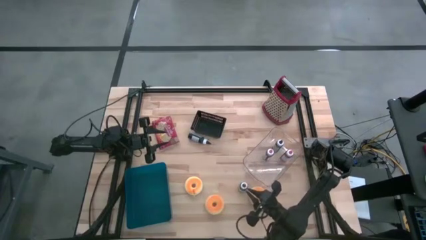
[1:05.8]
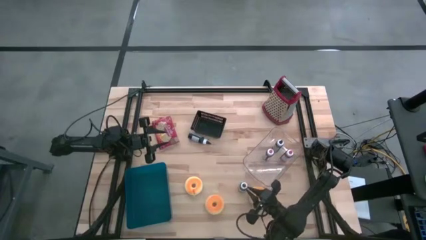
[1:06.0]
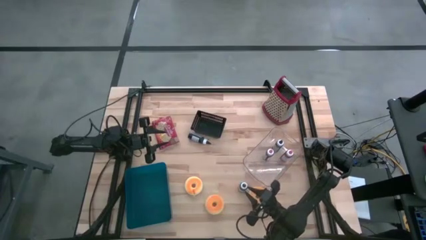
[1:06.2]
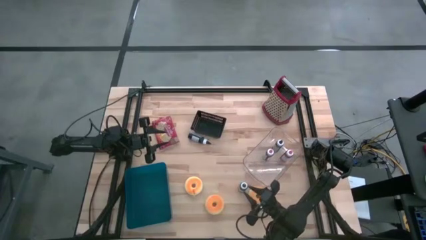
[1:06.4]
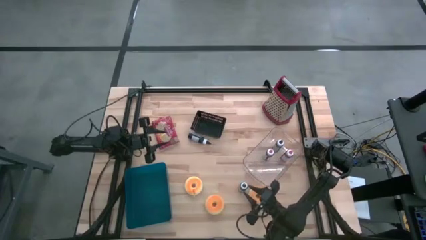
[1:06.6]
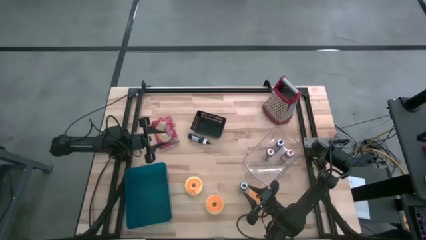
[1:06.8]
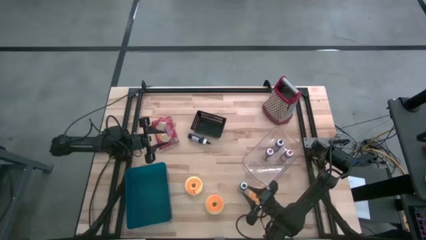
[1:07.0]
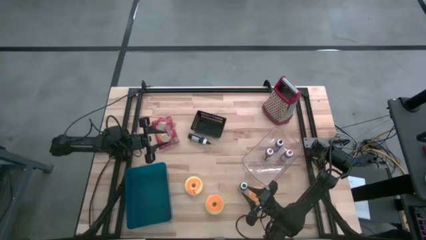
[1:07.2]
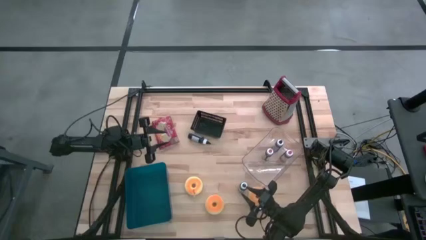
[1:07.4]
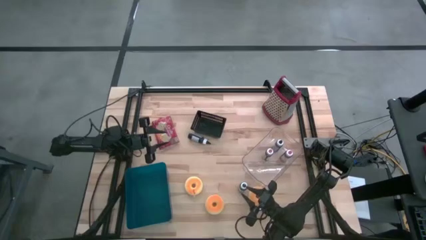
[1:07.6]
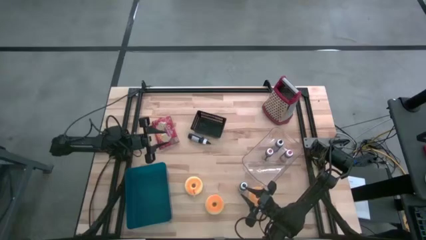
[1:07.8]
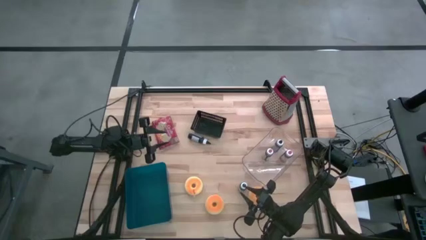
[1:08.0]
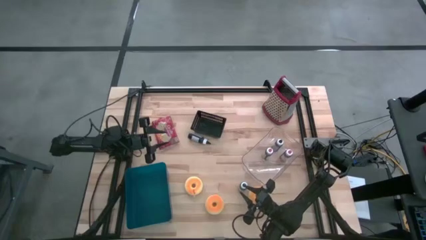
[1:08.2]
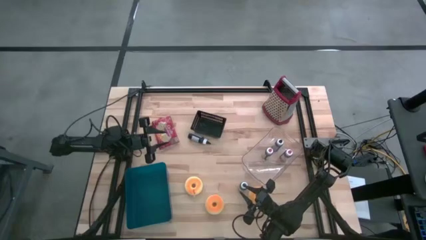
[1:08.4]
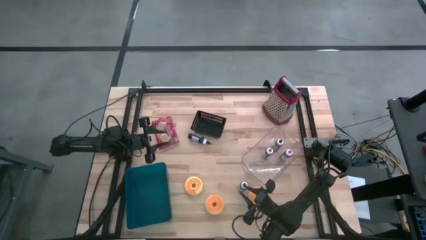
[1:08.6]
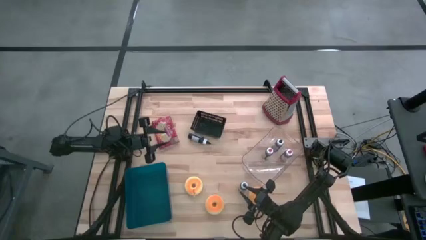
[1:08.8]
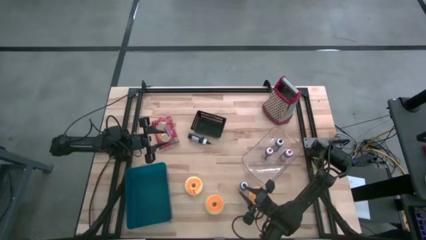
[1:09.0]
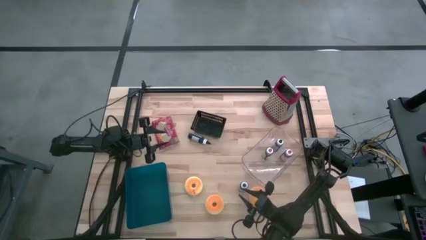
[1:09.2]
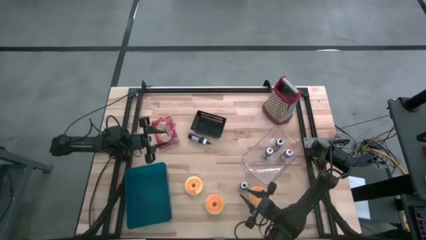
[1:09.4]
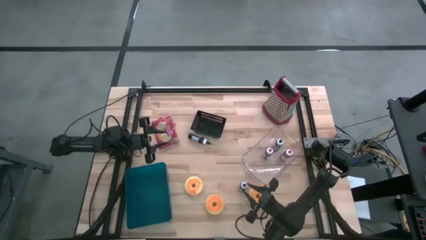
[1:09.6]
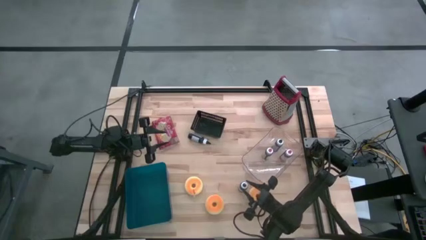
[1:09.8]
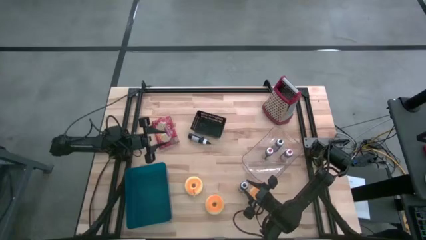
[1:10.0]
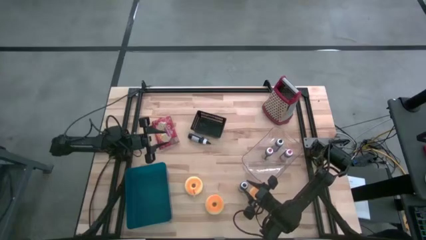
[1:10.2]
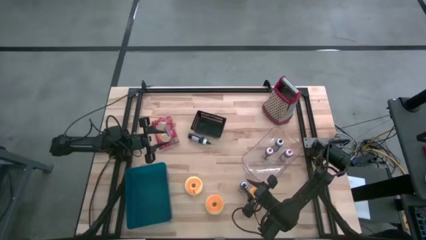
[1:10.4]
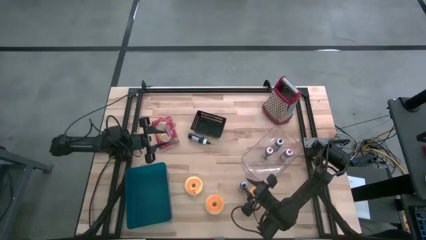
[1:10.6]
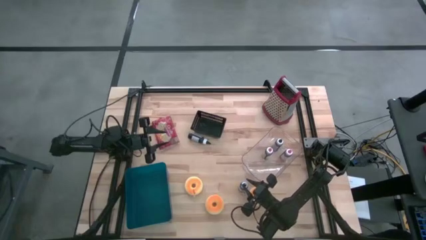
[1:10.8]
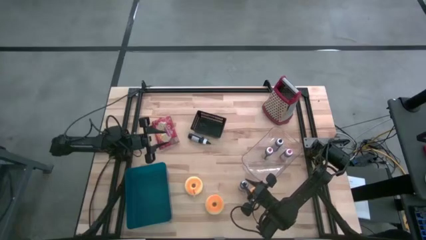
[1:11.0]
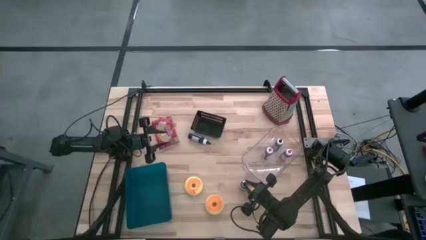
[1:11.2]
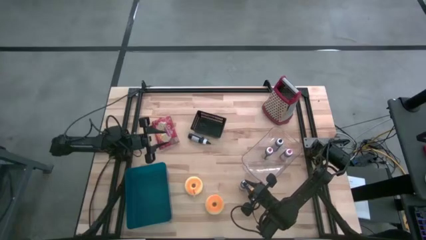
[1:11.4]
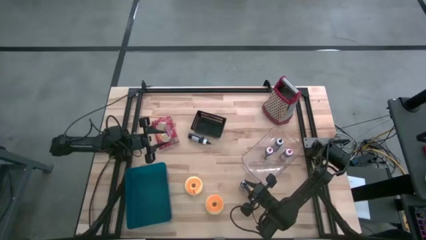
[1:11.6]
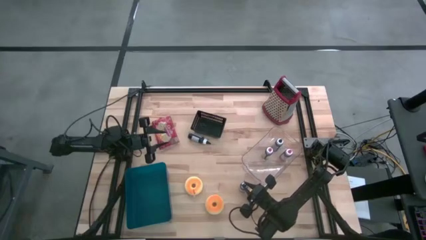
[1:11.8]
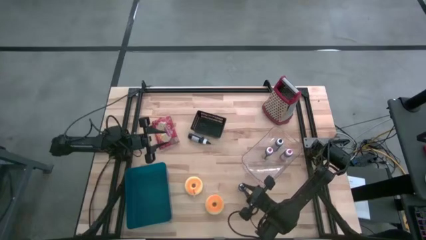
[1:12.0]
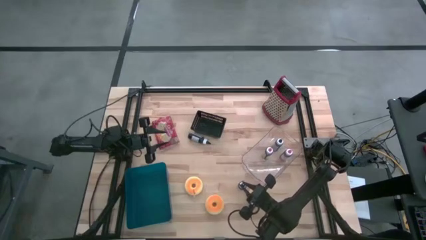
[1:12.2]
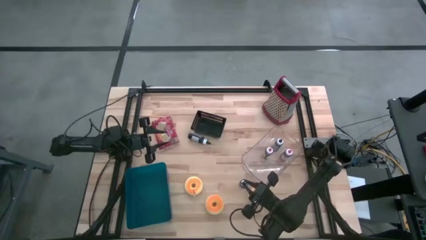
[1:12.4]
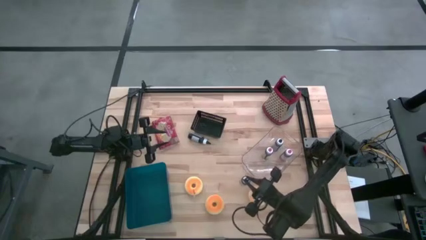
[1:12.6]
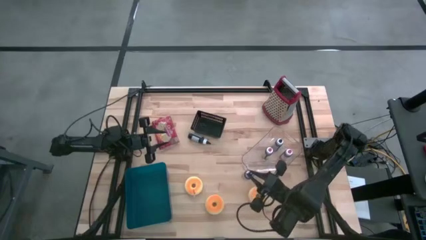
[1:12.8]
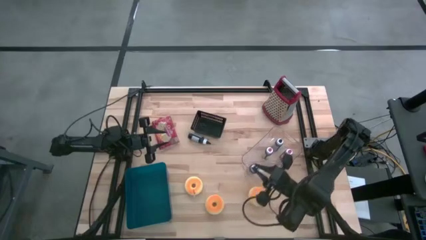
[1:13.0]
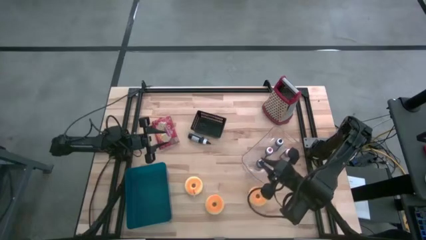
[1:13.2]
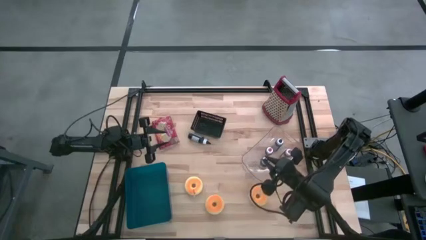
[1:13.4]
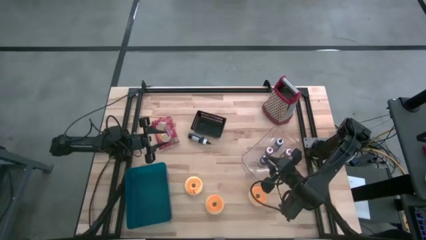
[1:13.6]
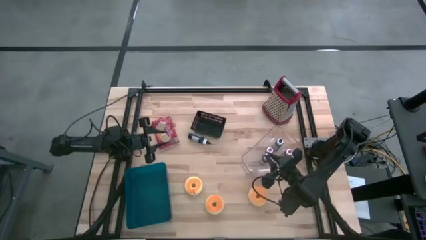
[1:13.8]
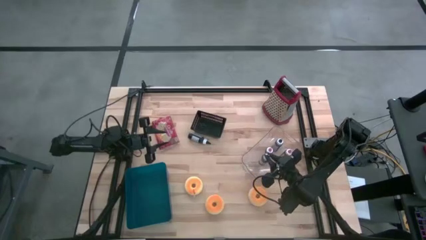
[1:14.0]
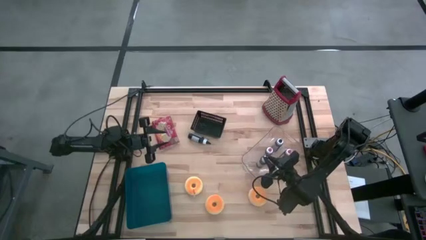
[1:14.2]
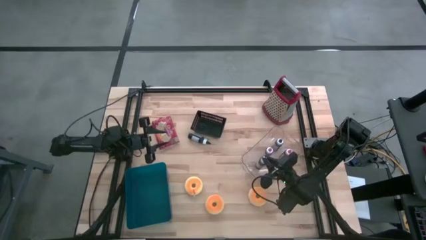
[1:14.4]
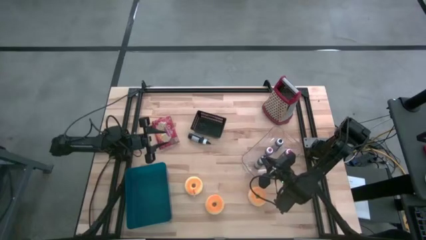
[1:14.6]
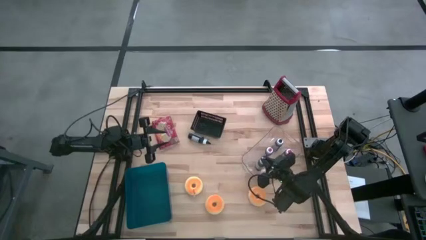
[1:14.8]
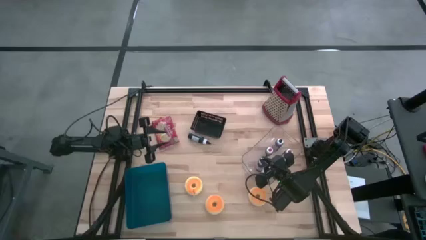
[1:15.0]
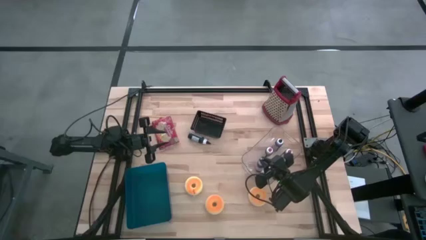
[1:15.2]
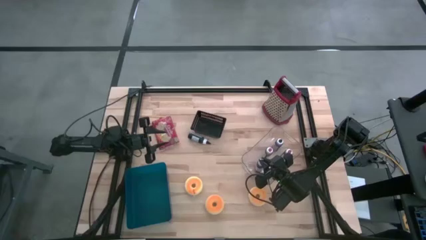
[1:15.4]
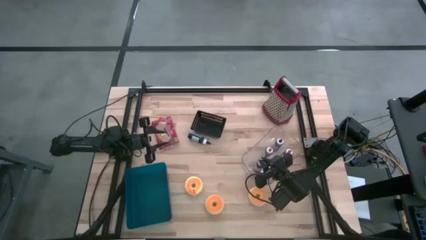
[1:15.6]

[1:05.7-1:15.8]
Task: Pick & Place Food Item
Put the bottom black food coloring bottle into the transparent bin

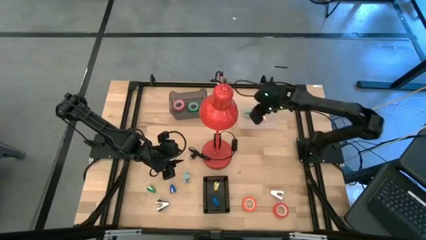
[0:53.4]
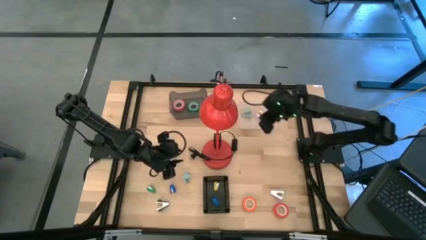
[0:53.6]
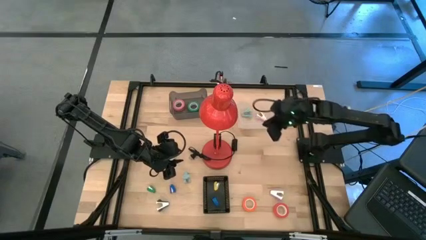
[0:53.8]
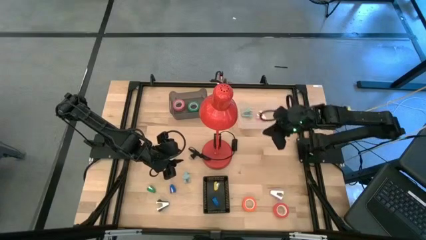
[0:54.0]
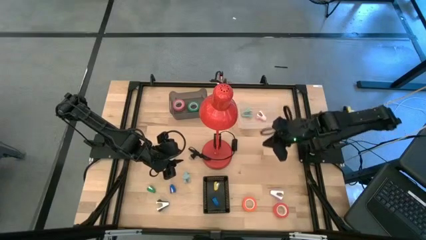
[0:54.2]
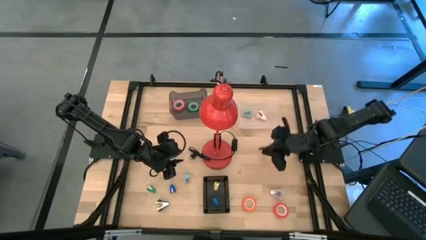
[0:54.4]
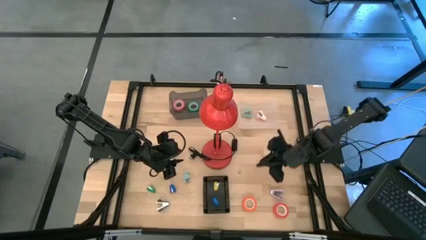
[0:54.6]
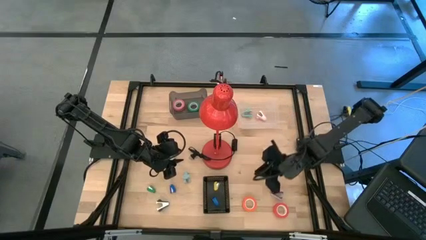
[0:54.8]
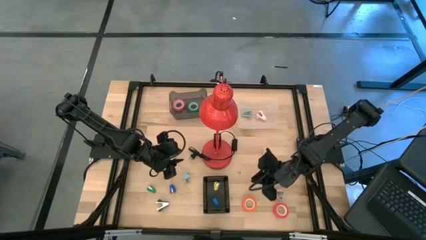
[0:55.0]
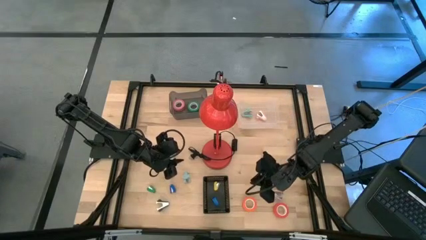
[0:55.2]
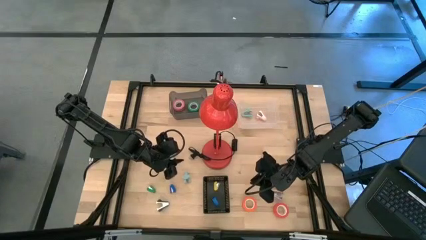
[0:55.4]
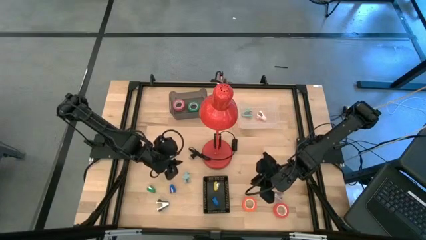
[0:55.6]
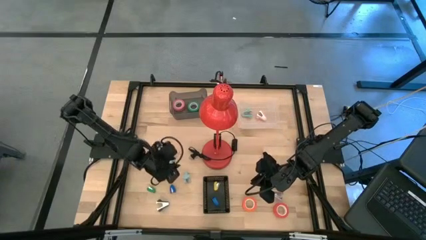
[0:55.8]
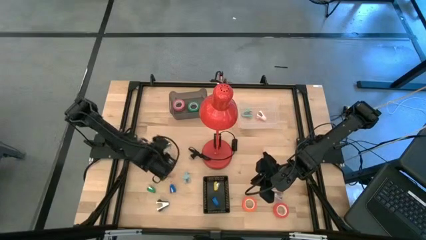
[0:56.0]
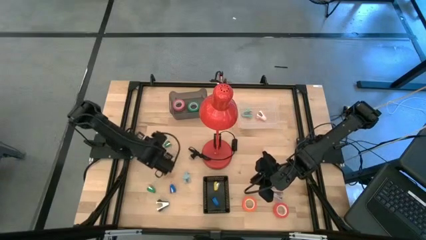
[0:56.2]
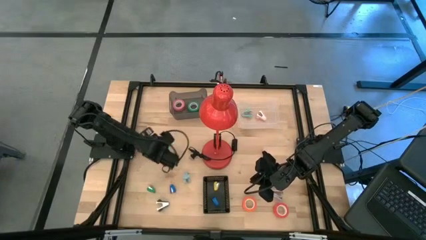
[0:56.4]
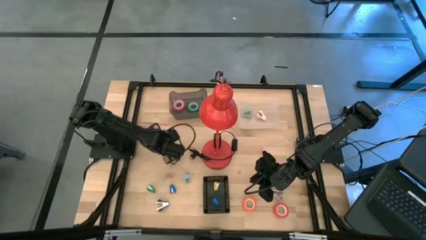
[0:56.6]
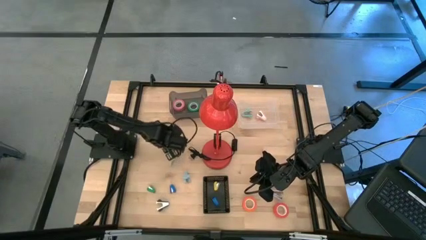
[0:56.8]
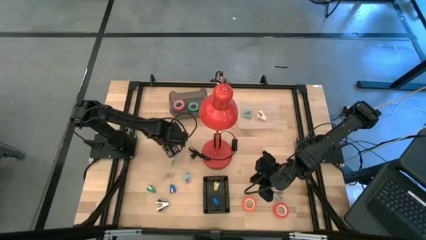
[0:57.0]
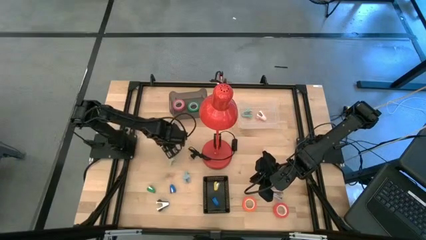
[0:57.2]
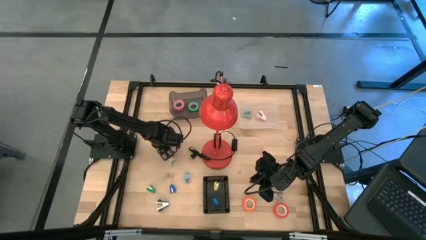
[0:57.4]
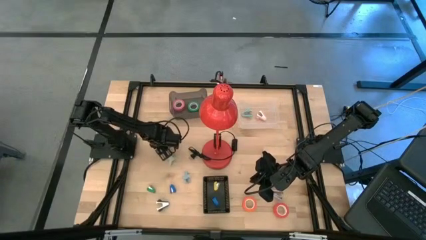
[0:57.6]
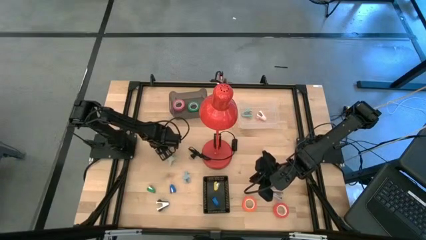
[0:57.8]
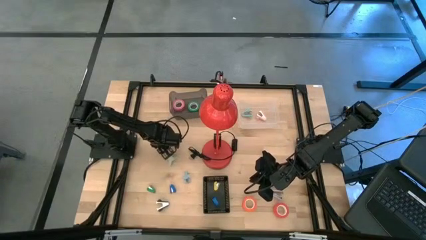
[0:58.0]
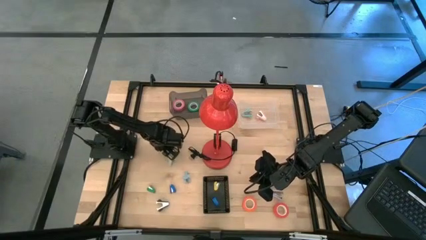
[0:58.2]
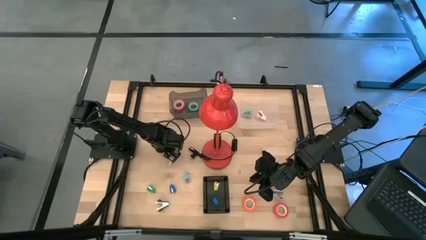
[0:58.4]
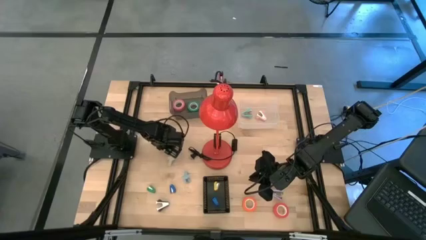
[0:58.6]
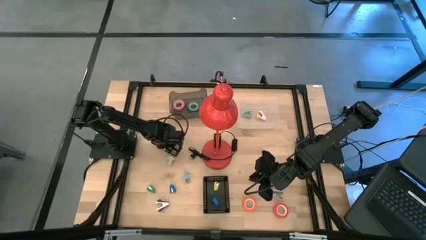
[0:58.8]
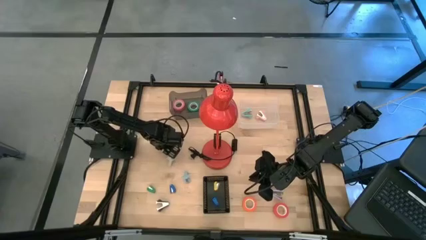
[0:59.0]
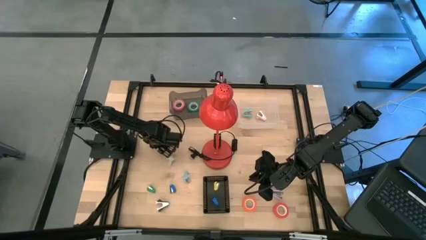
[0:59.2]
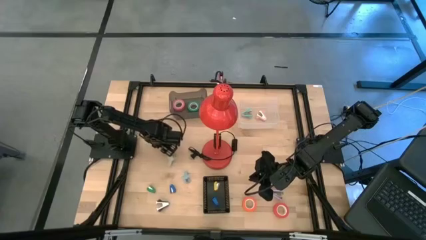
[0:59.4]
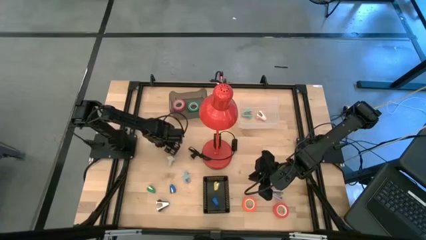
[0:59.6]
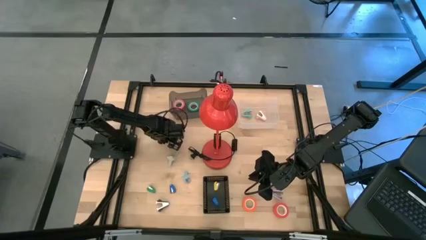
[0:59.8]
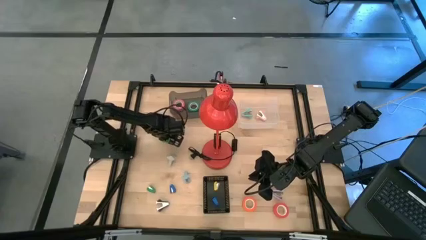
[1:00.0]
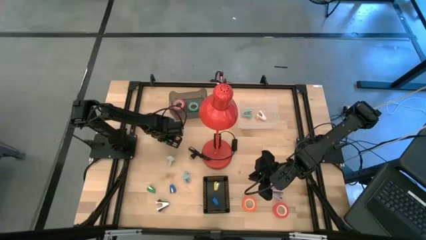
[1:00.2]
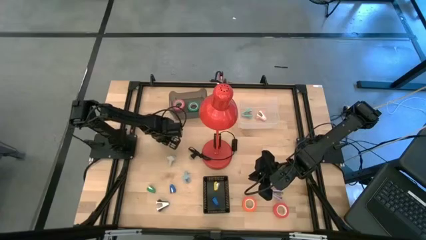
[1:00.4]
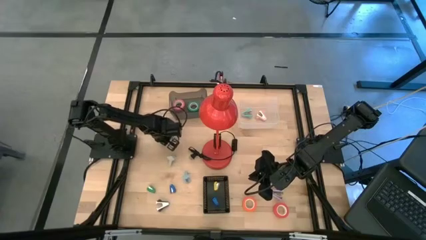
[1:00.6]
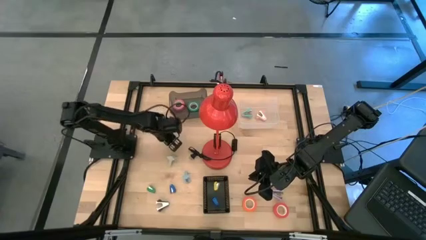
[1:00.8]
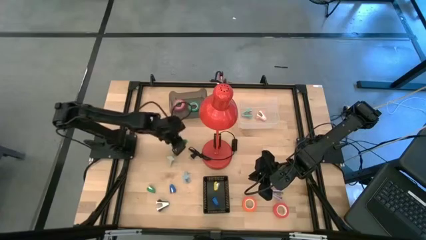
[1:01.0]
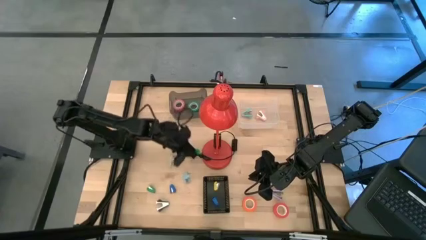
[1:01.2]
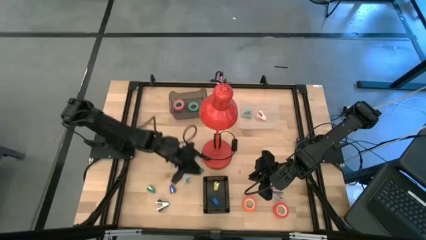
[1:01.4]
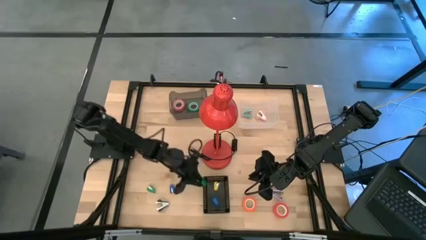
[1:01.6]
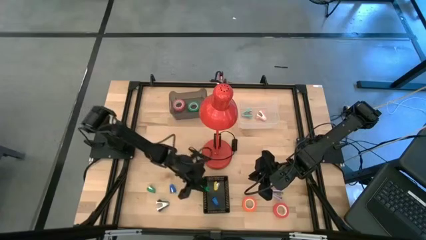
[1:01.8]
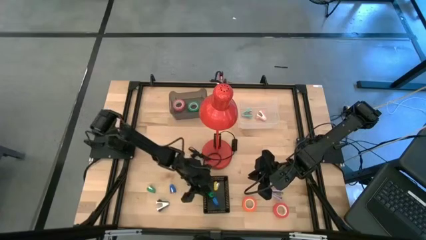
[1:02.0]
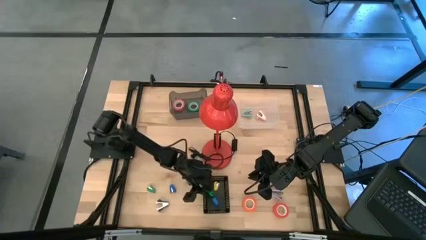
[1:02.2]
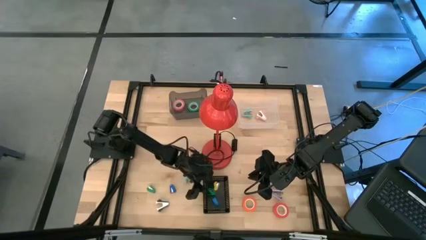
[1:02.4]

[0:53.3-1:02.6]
Task: Pick and place Stapler, Stapler remover, tape
Put the top green stapler into the black bin
